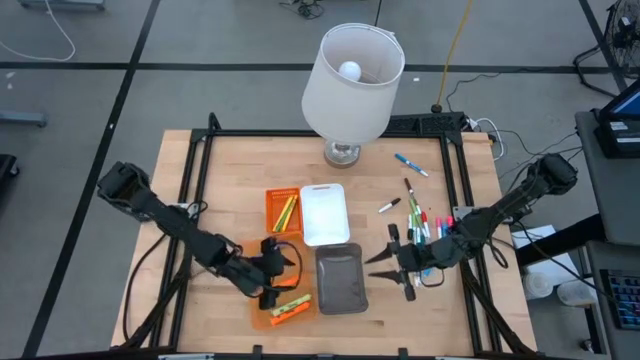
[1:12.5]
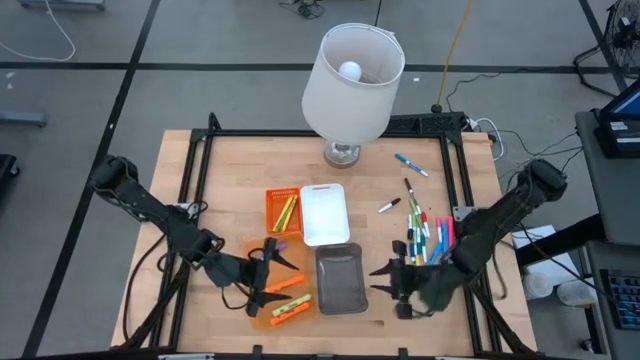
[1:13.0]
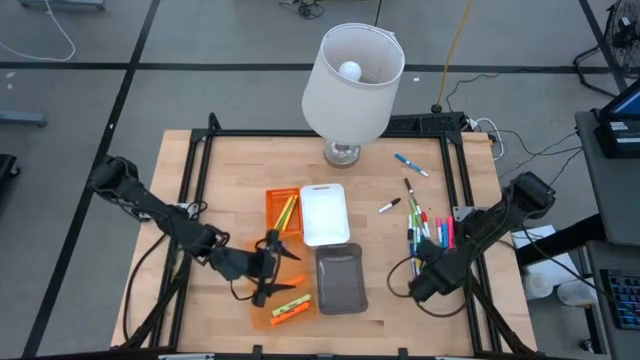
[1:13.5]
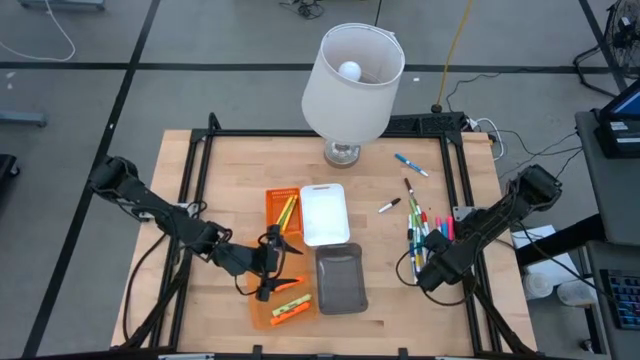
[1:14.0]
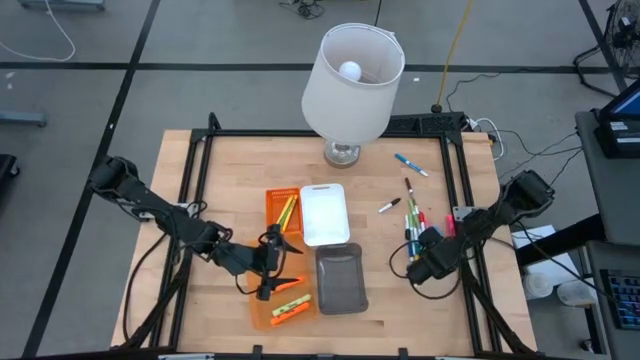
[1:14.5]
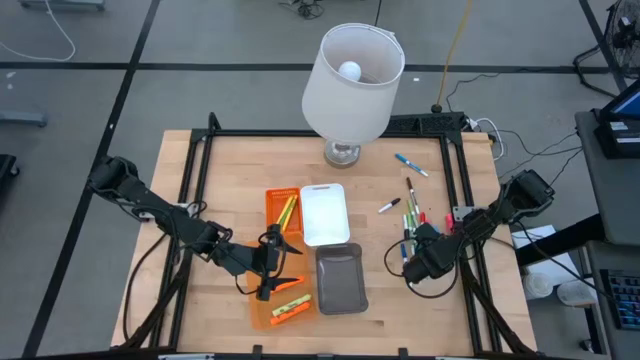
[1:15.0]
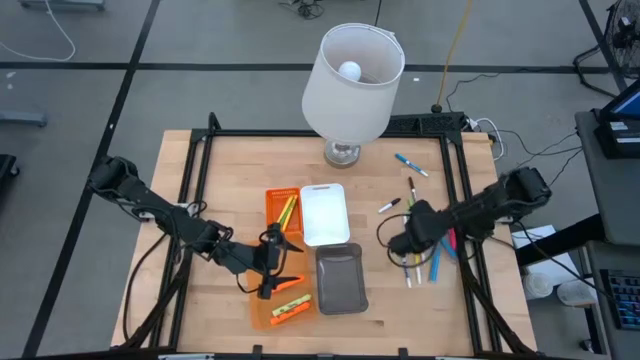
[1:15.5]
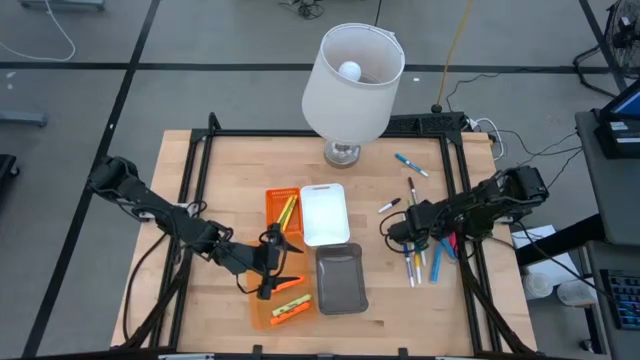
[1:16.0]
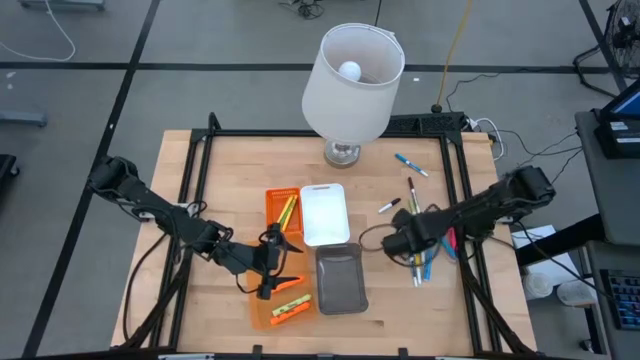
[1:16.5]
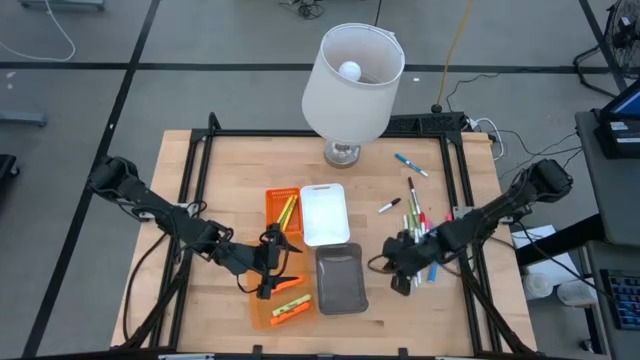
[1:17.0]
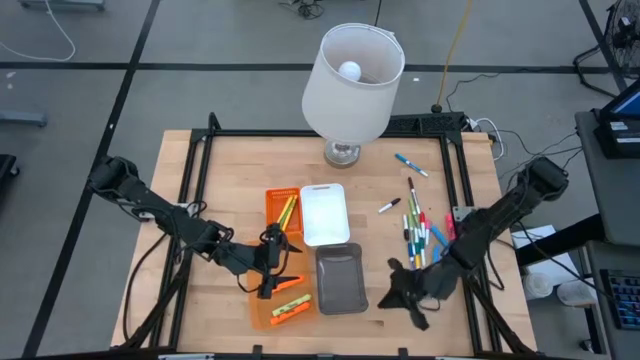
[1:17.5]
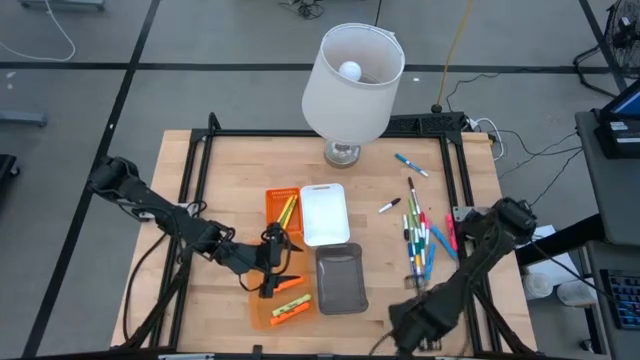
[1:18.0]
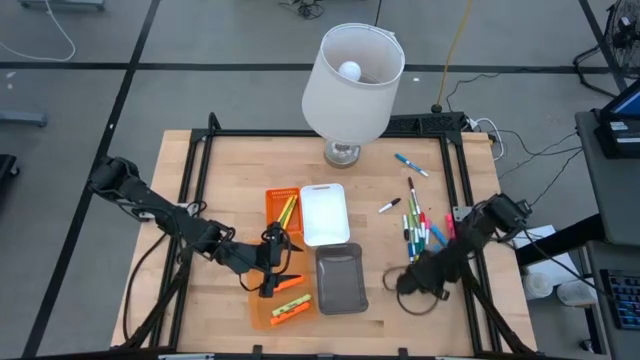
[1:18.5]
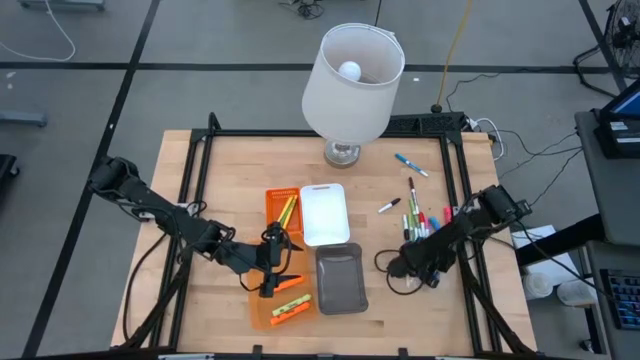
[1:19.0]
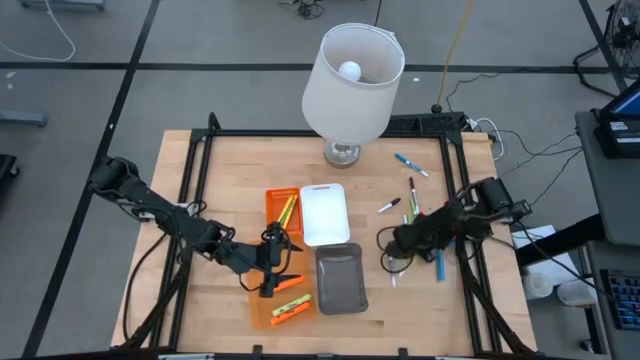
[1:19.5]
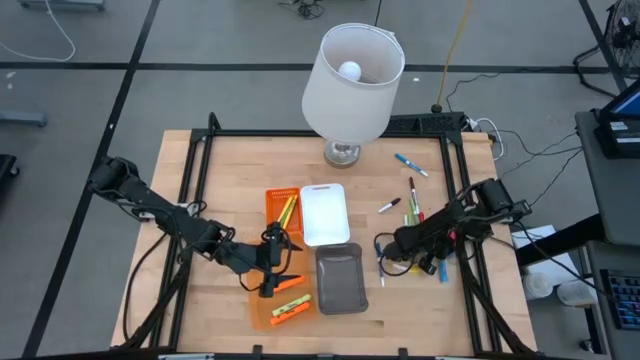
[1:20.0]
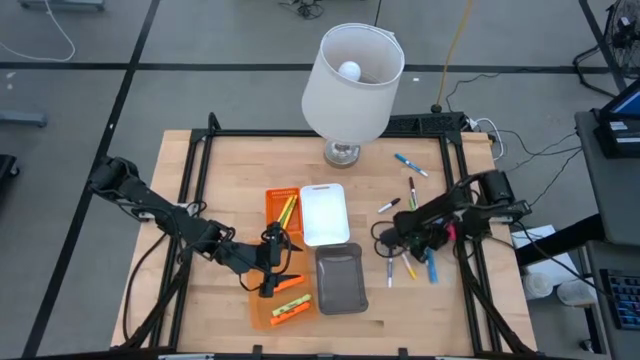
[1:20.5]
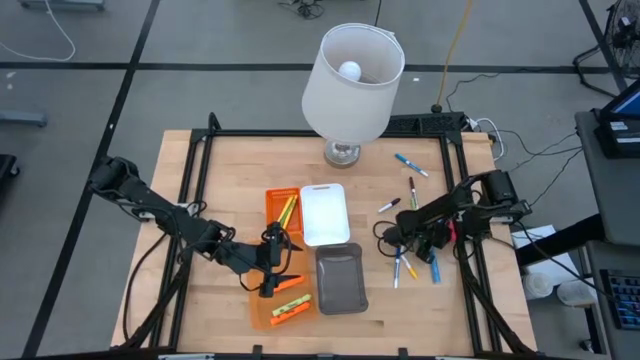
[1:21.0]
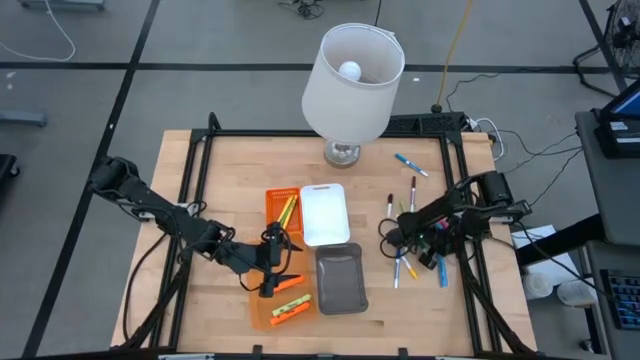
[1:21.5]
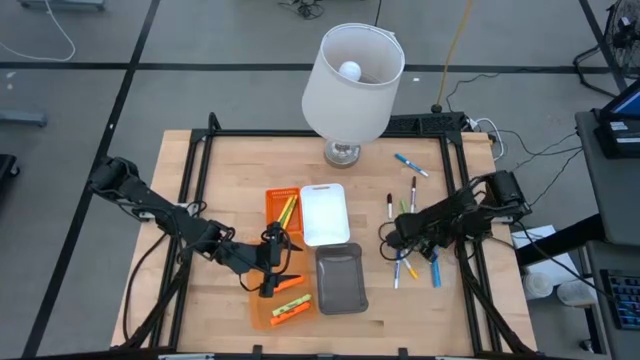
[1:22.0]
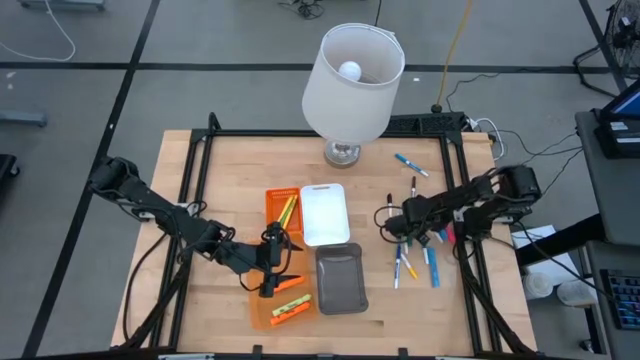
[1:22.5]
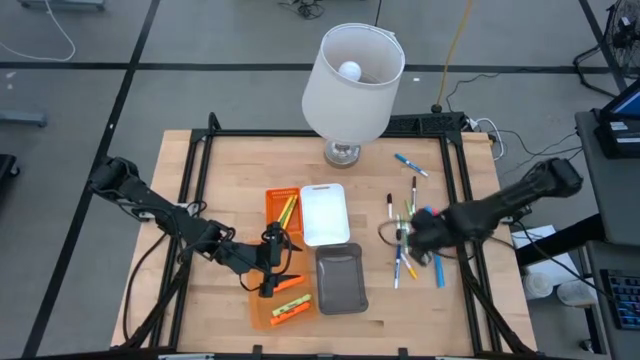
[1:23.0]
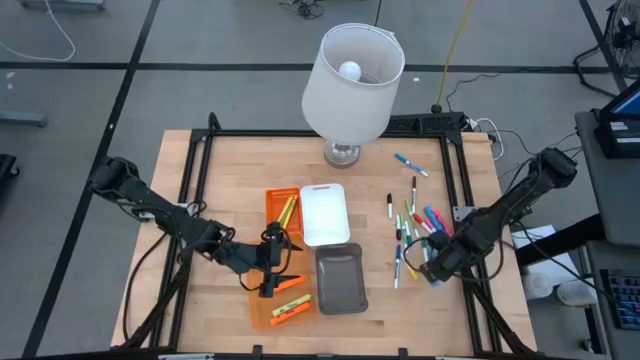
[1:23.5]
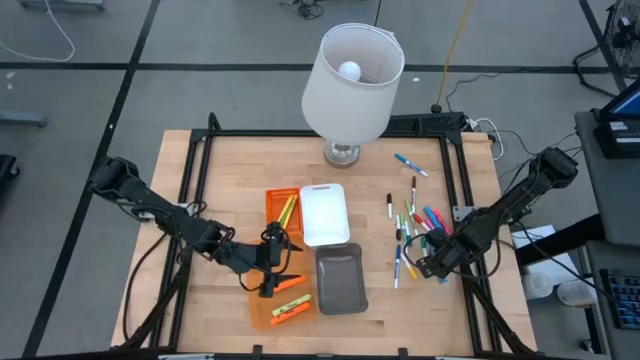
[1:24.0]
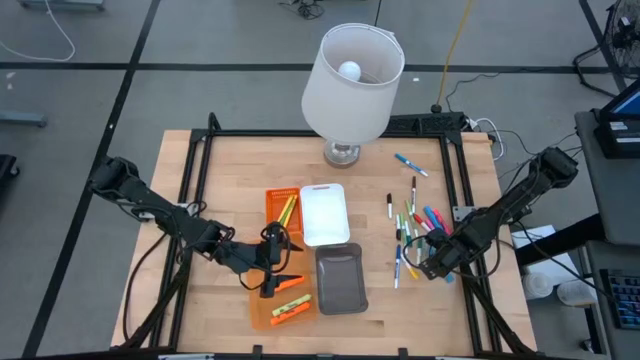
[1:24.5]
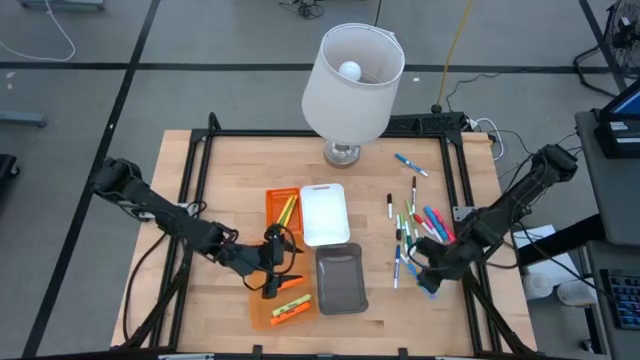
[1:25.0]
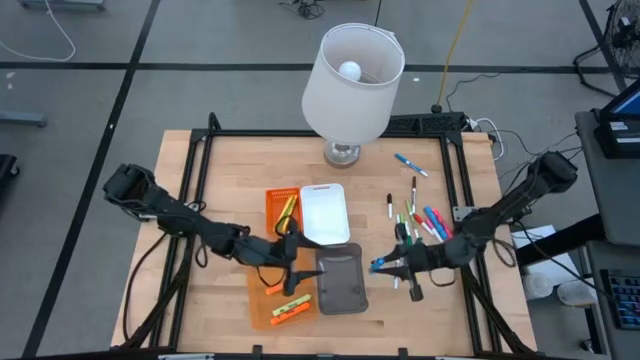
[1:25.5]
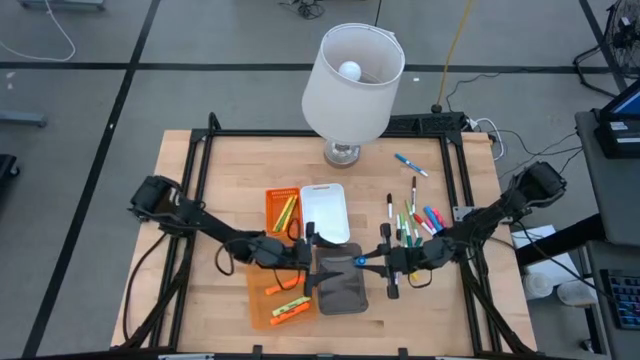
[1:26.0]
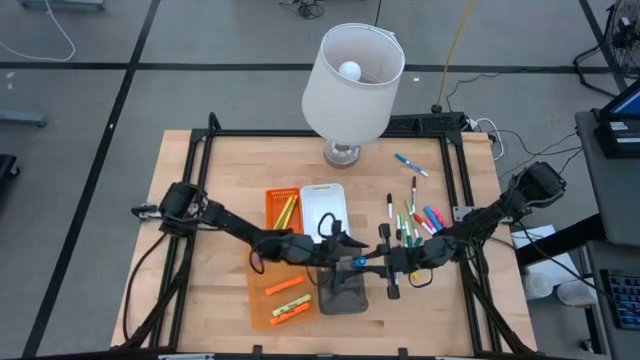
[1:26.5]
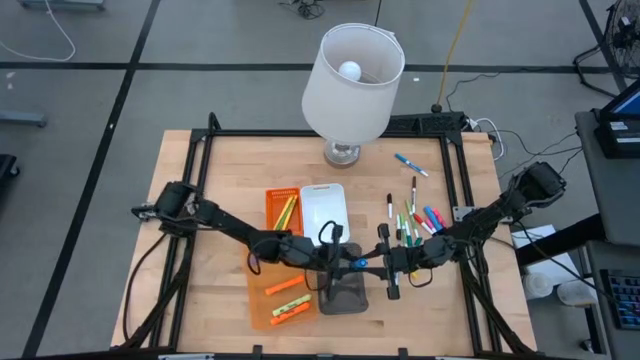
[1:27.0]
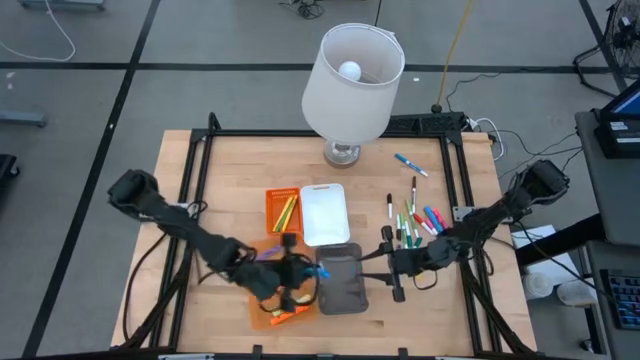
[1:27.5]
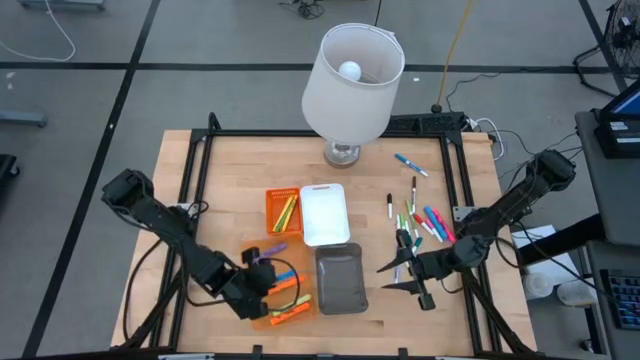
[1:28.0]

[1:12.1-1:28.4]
Task: Pick & Place Markers
Put the bottom blue large highlighter pen into the transparent orange bin

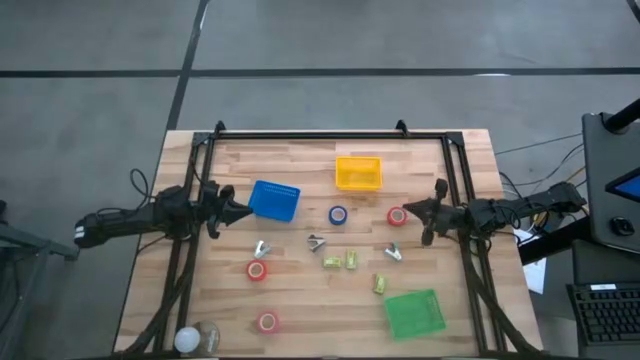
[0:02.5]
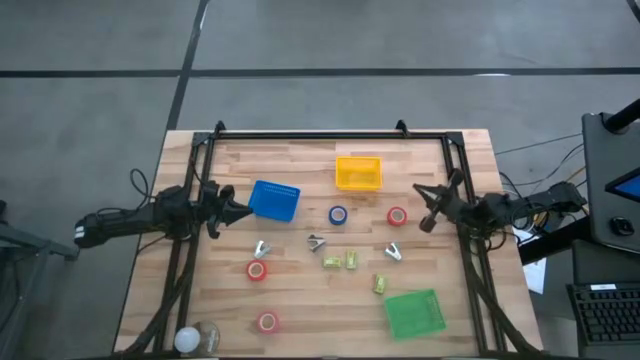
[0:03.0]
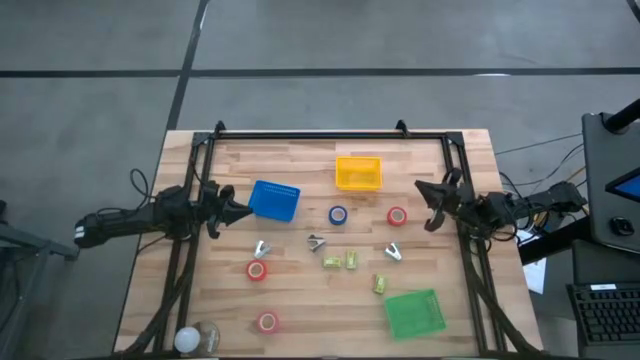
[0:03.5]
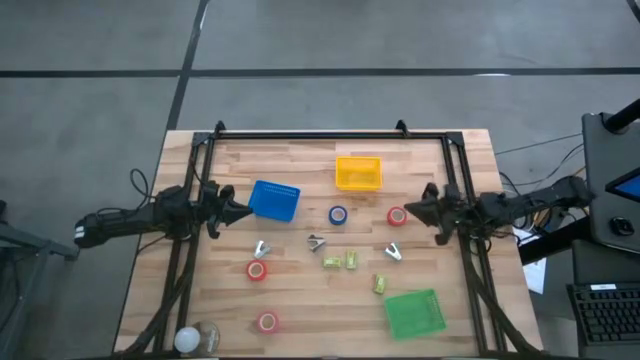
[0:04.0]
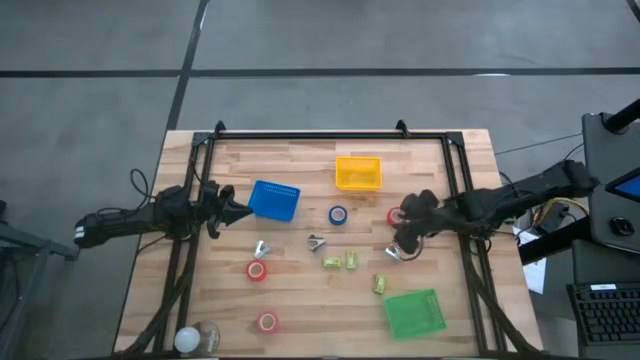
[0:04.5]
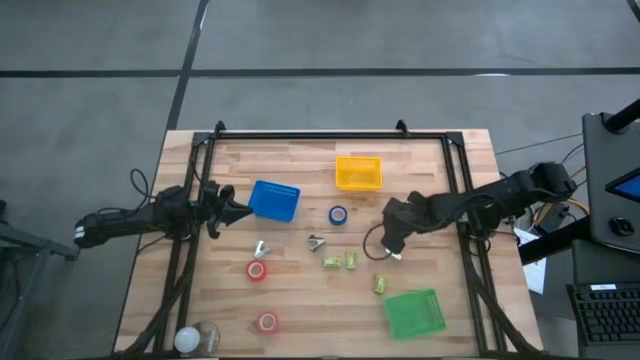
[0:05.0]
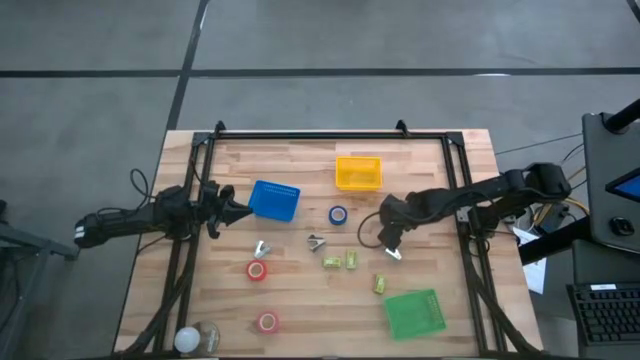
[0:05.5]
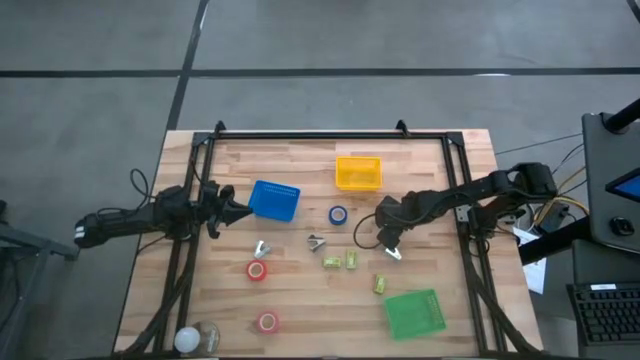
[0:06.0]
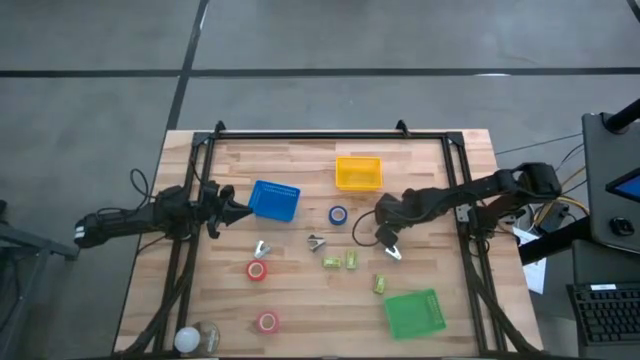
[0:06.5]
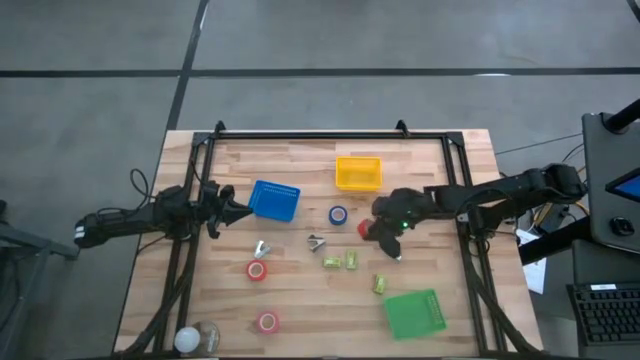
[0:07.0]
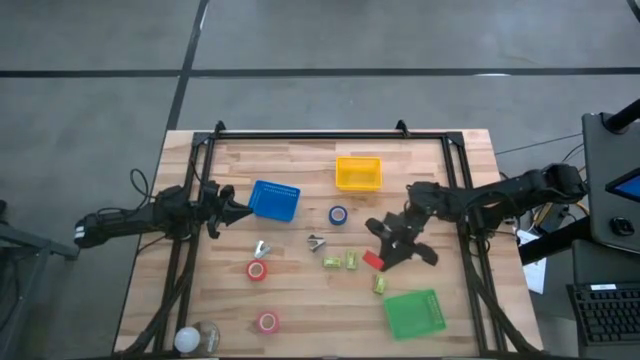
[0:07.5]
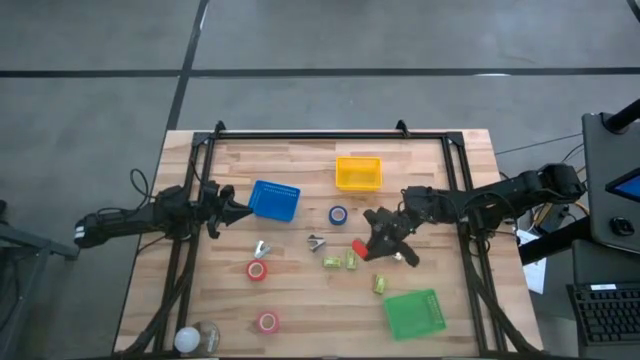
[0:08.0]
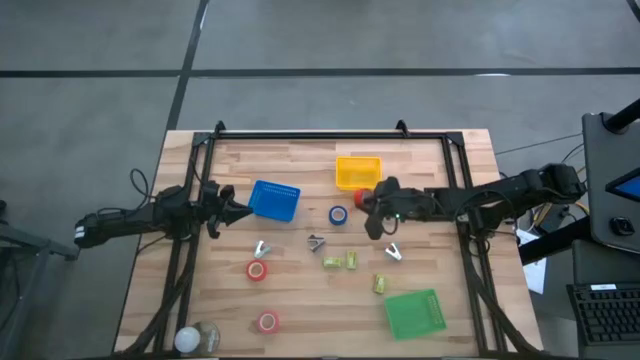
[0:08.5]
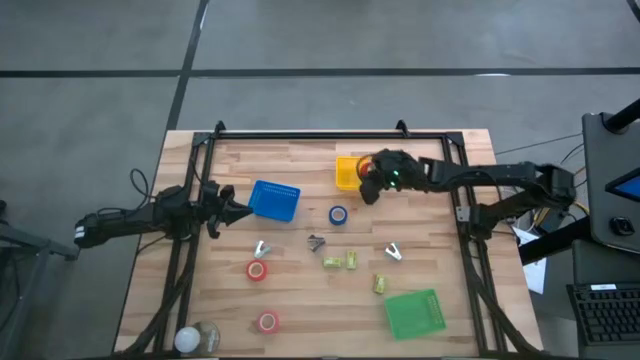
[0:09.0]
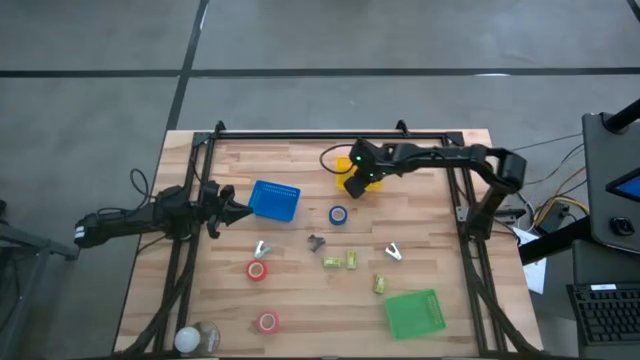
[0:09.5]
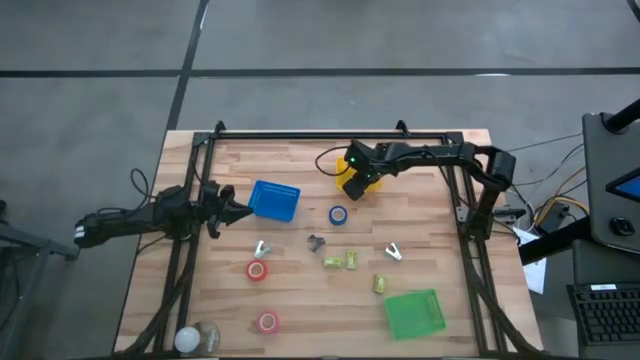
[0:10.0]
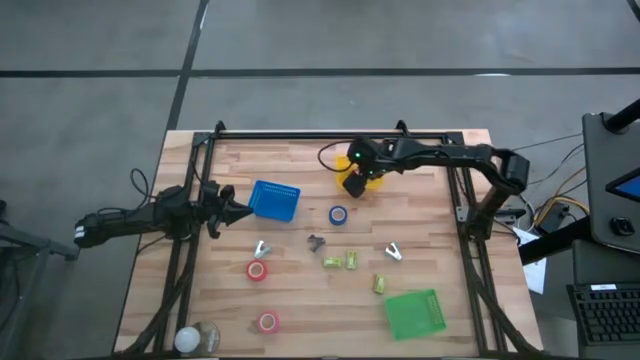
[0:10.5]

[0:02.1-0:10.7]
Task: Pick and place Stapler, Stapler remover, tape
Put the right orange tape into the yellow bin
